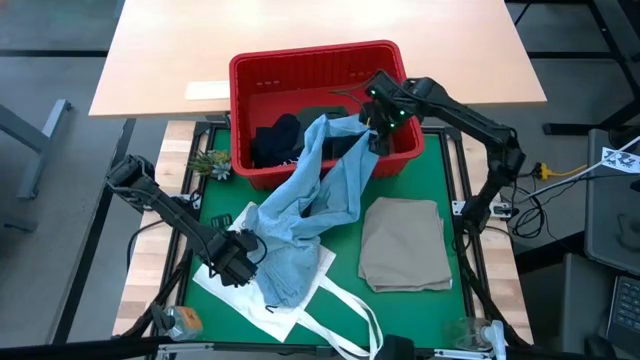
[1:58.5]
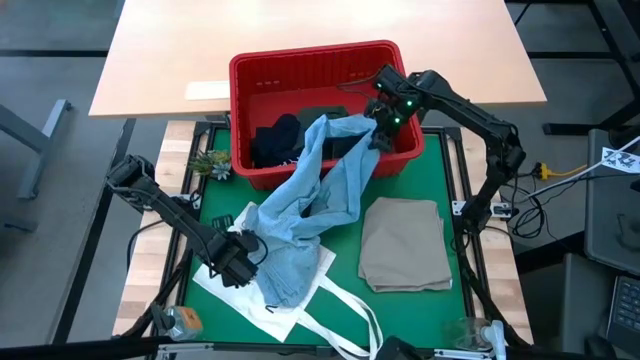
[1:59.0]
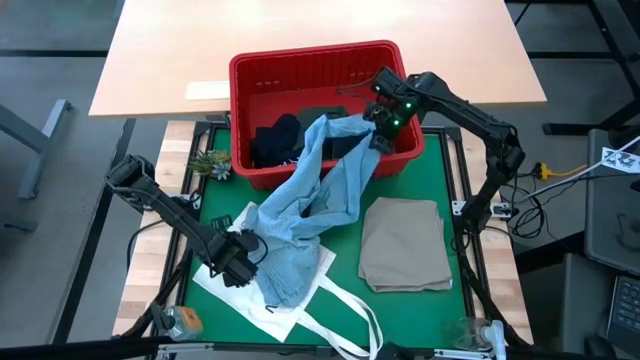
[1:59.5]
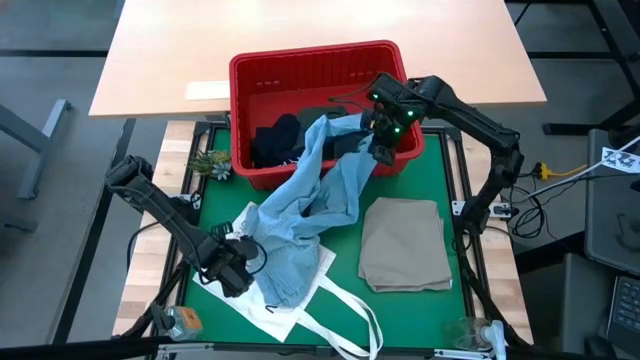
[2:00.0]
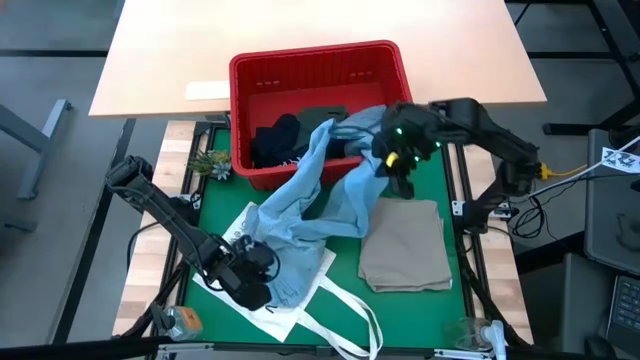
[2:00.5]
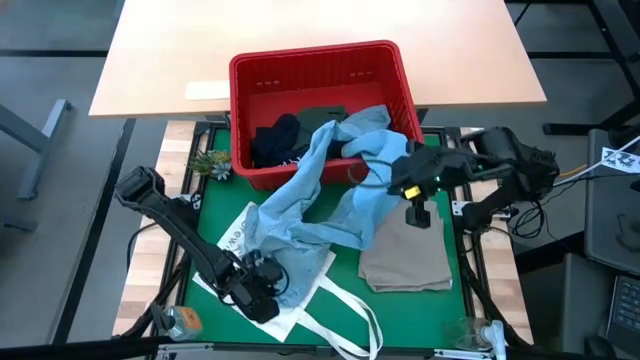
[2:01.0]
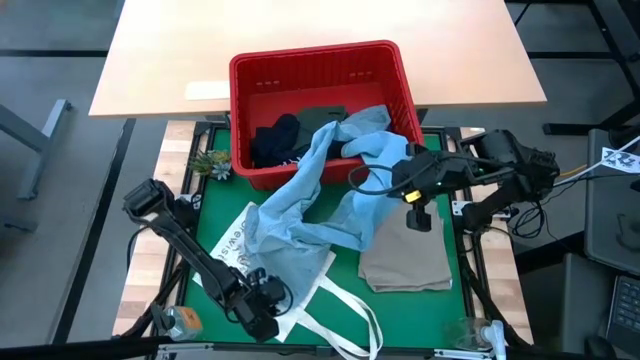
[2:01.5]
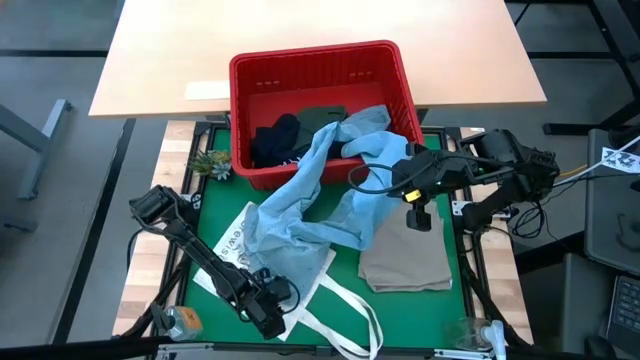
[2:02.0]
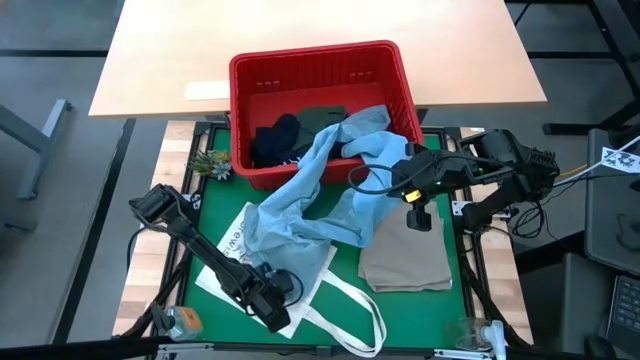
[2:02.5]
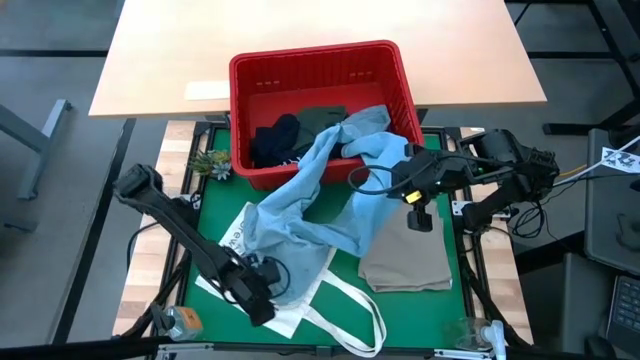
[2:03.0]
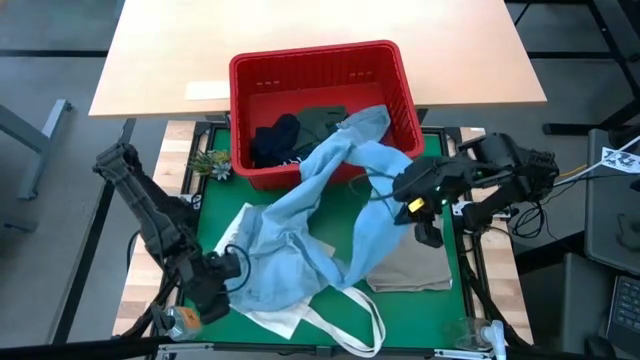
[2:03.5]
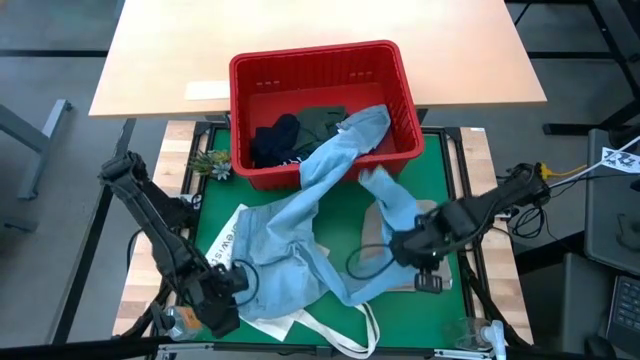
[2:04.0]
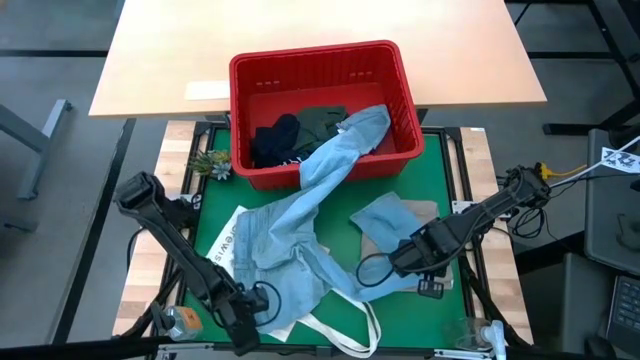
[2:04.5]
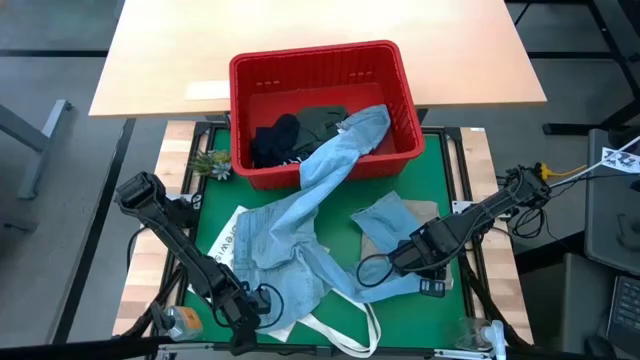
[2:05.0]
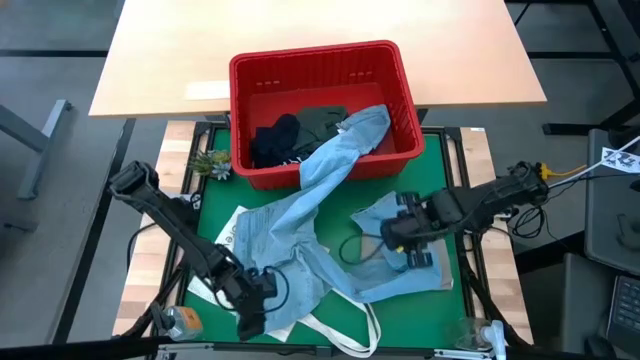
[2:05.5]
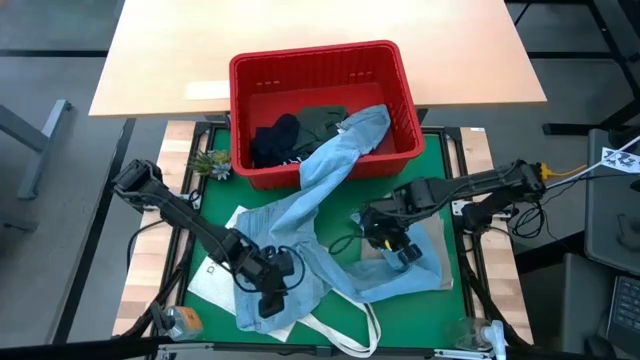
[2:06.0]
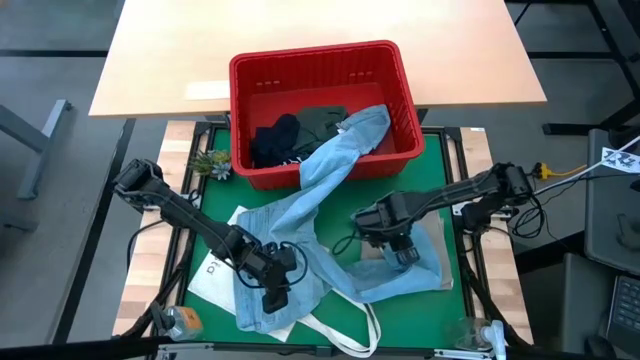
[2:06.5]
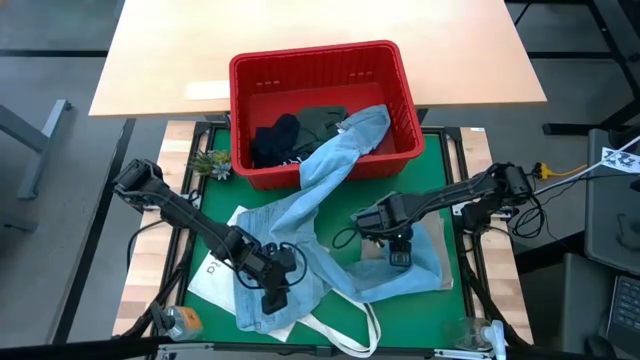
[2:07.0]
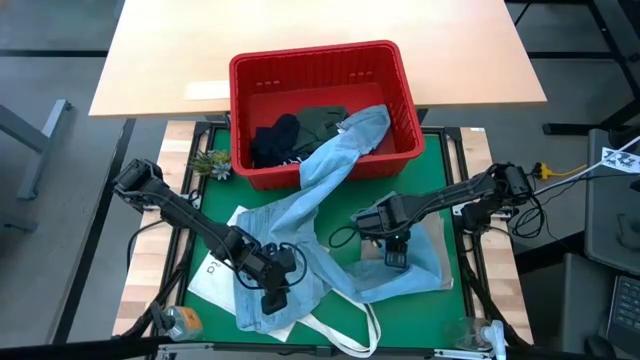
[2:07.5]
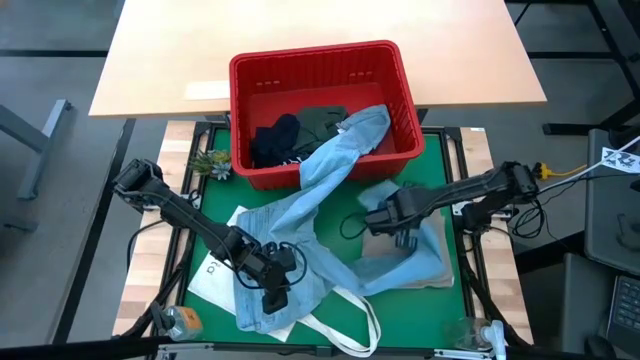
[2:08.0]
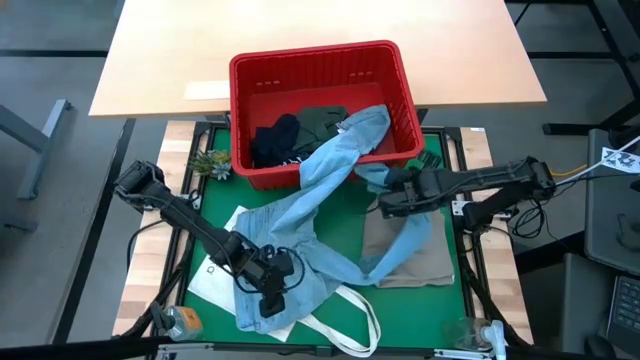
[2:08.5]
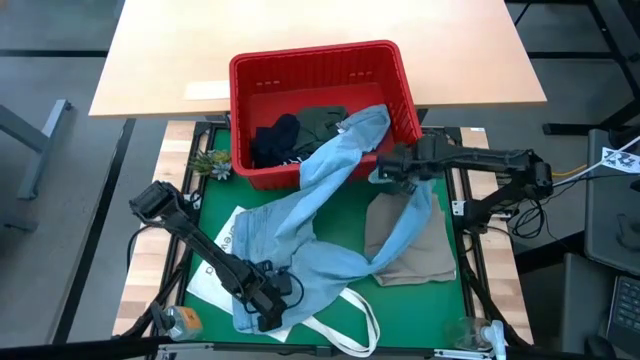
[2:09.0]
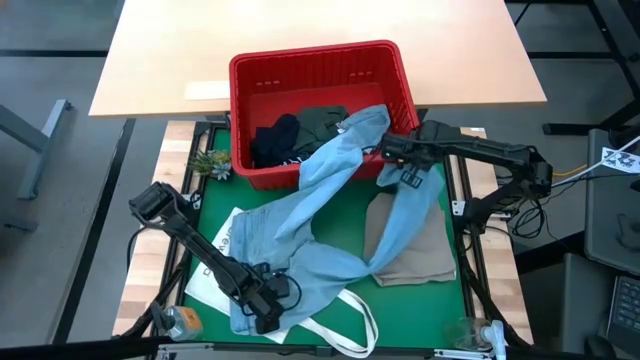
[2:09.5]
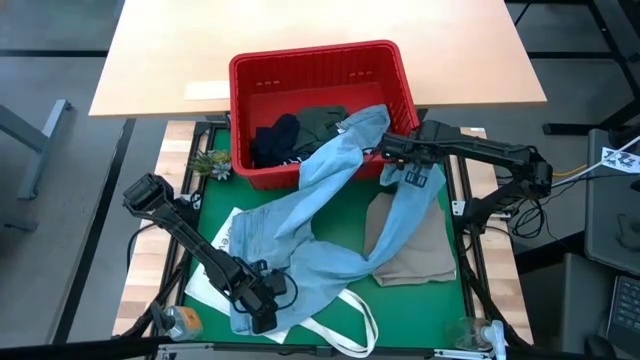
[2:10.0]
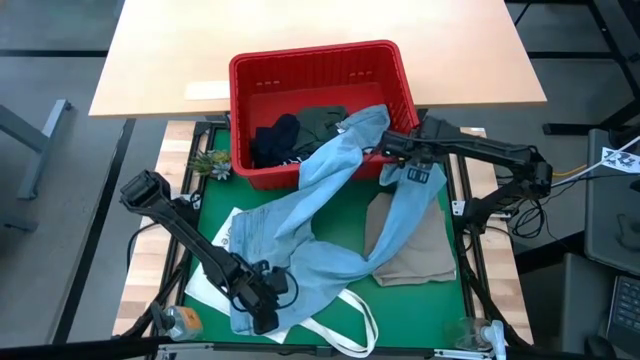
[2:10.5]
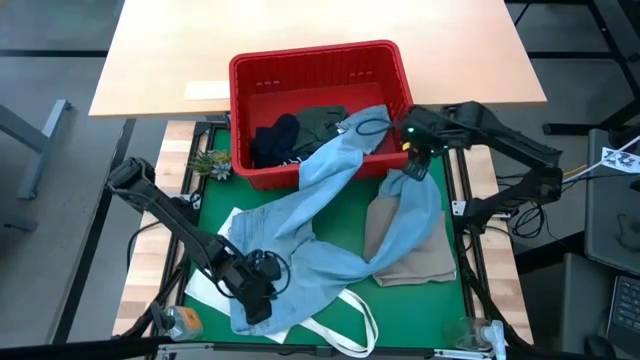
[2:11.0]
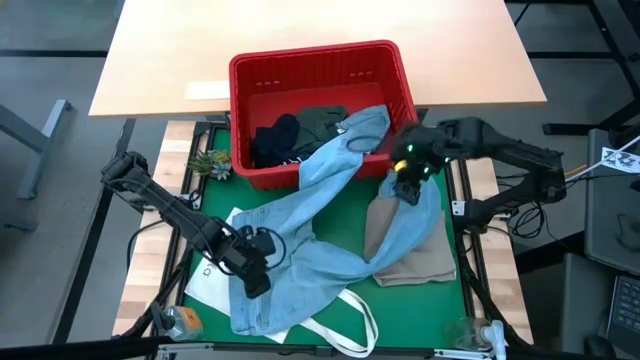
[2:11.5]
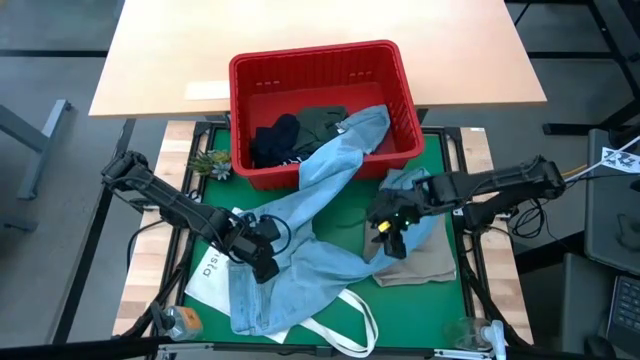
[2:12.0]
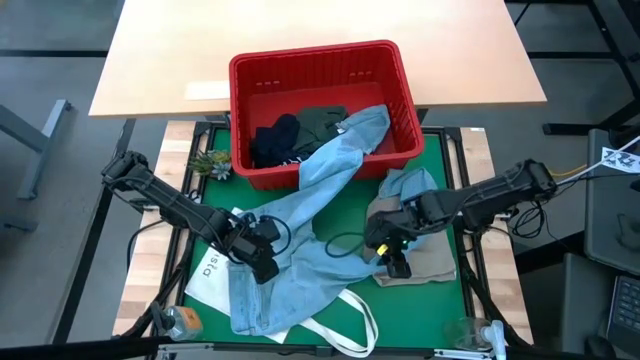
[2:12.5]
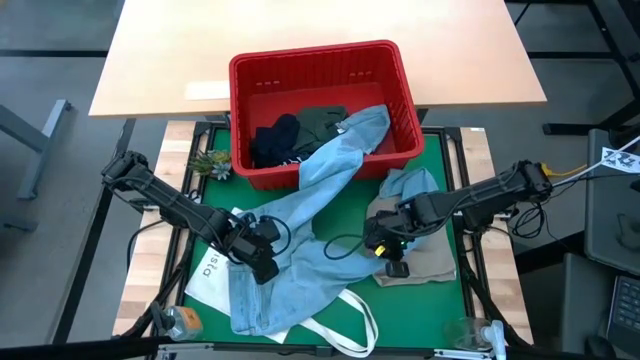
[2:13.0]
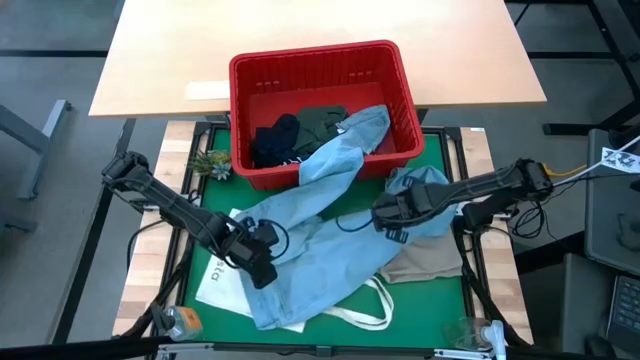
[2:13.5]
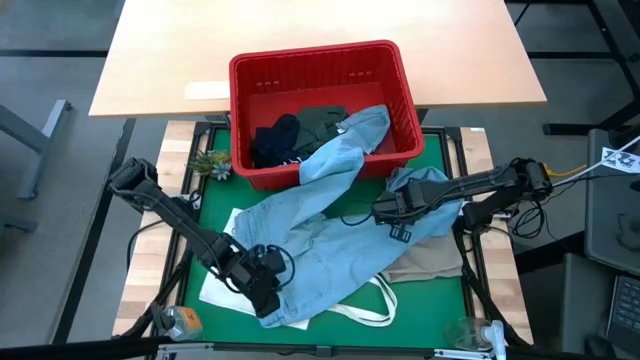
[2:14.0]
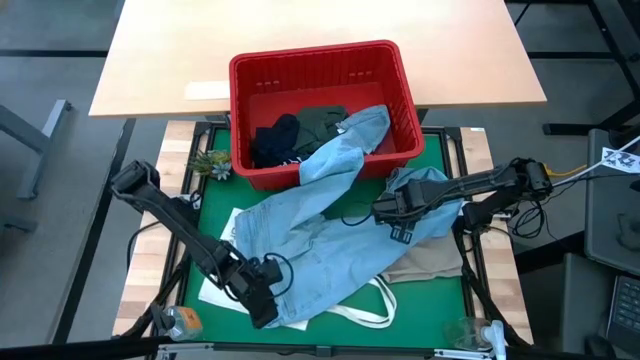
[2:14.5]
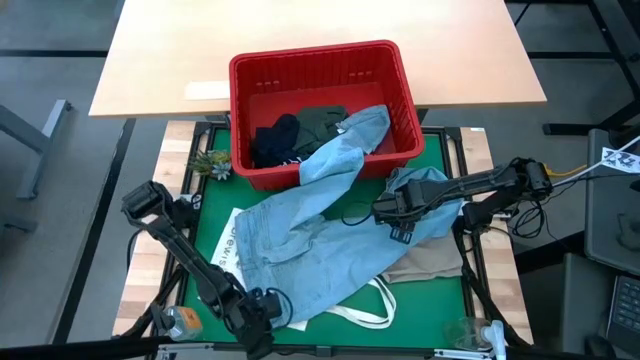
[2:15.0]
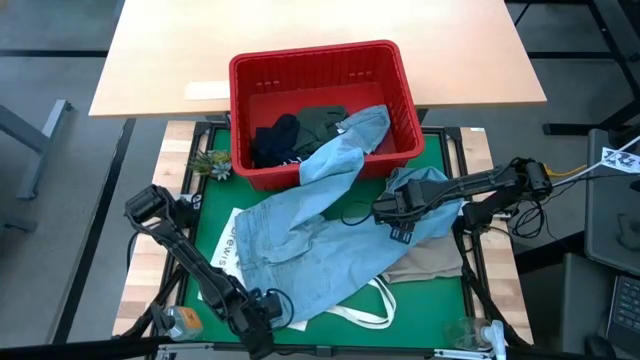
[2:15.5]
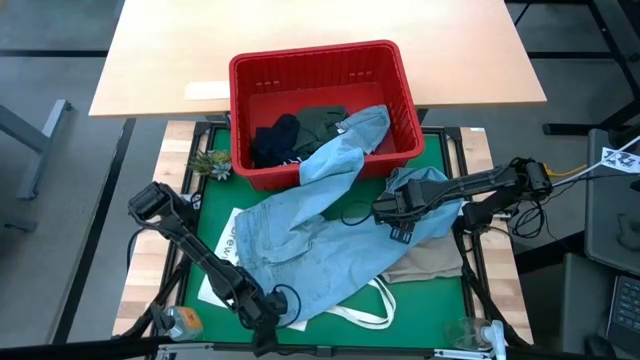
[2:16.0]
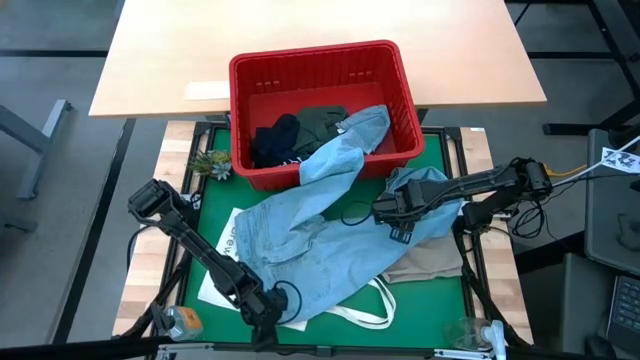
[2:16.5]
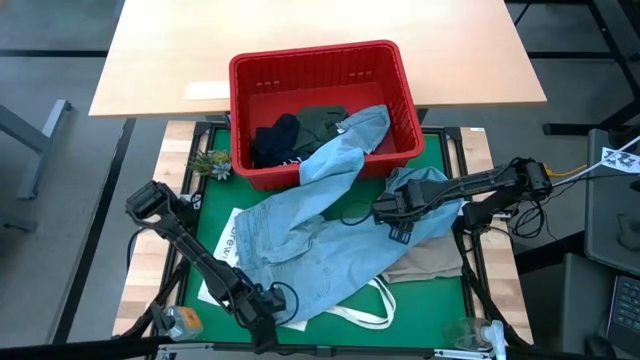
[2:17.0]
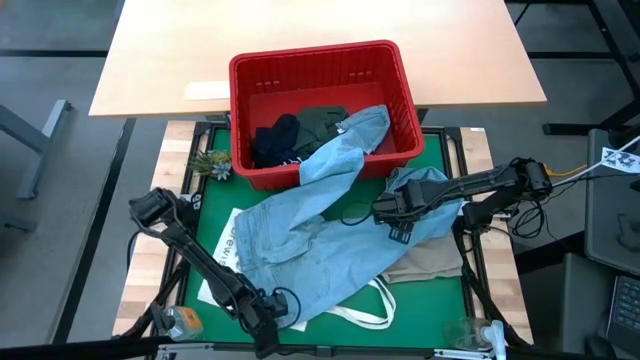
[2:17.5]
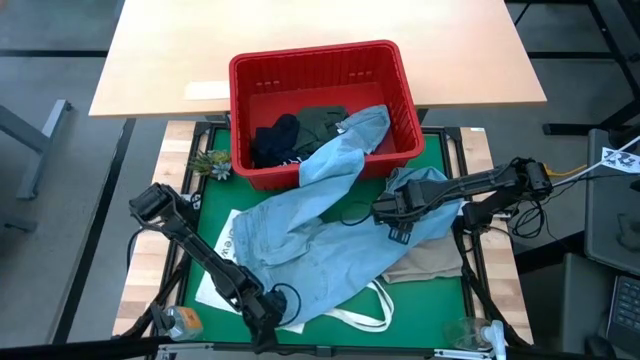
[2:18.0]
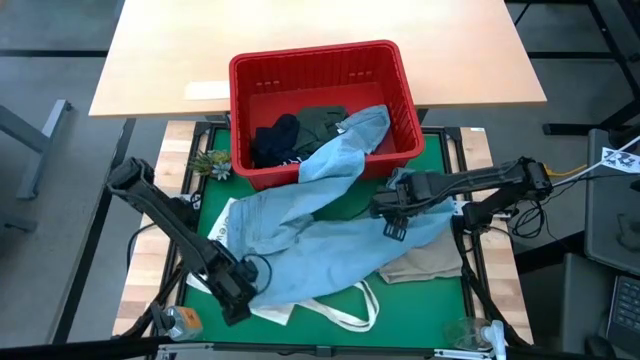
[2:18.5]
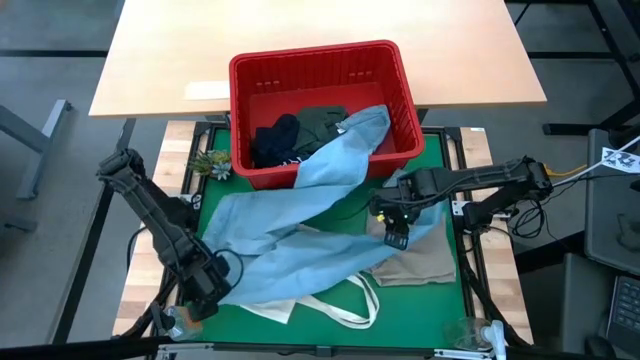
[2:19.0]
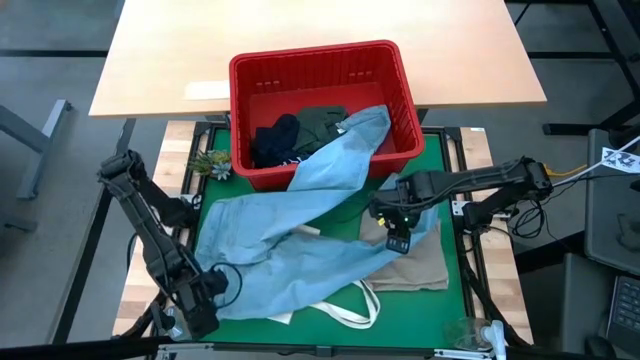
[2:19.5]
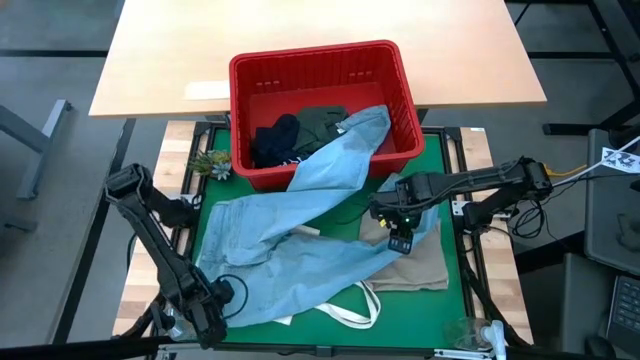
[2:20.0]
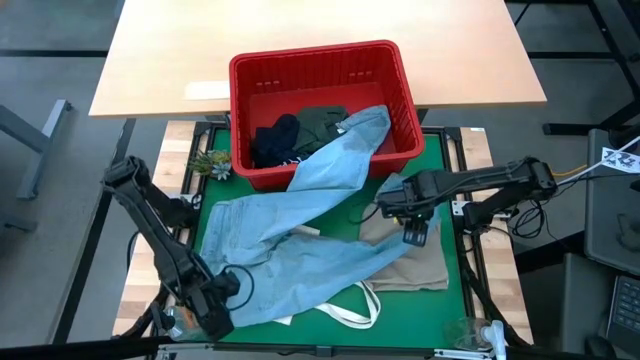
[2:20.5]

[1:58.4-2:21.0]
Task: Fold Laundry from Bin
Fold the light blue pants
